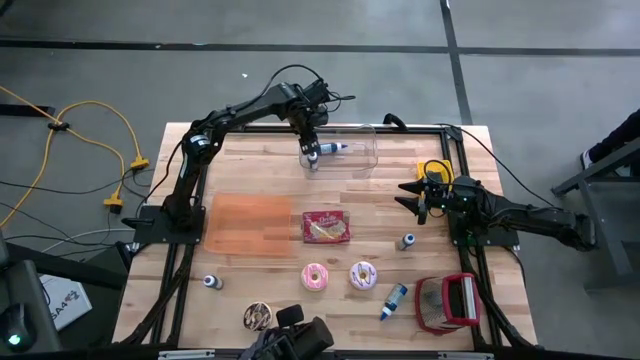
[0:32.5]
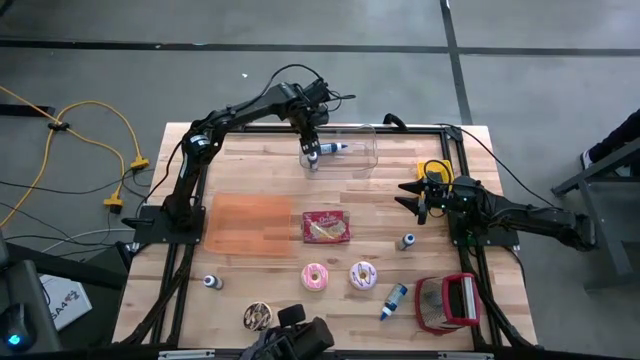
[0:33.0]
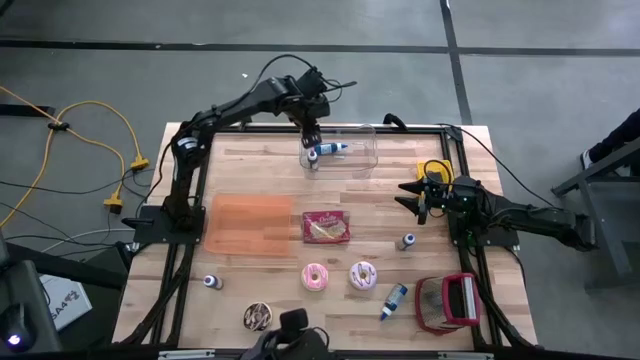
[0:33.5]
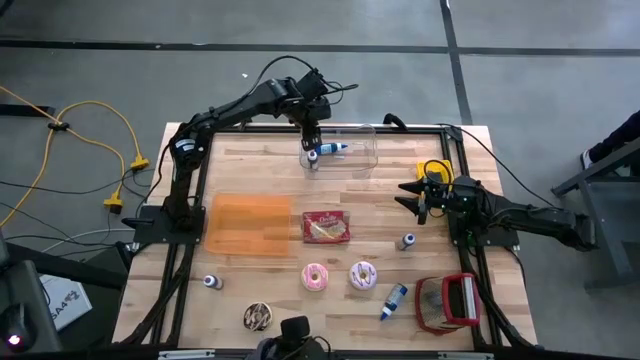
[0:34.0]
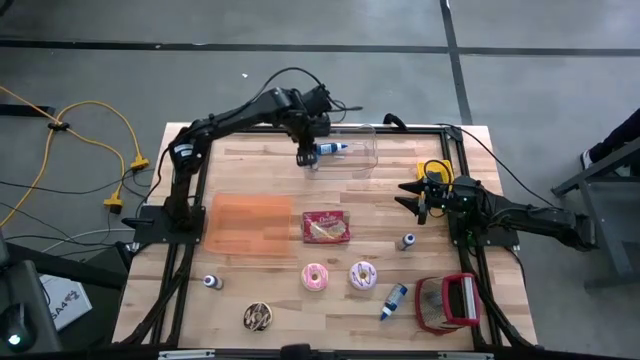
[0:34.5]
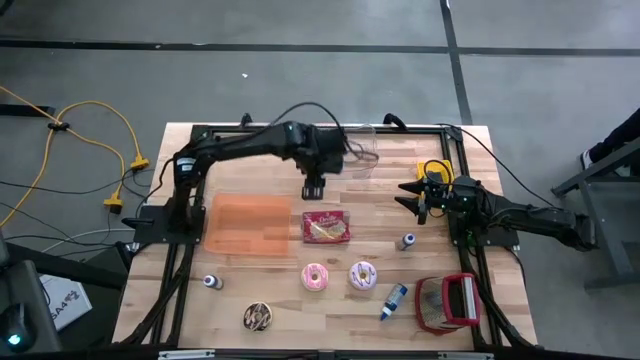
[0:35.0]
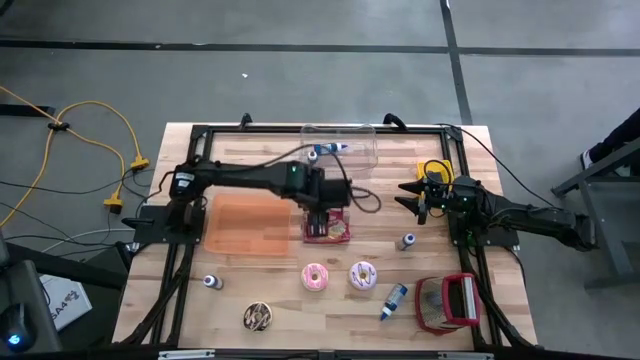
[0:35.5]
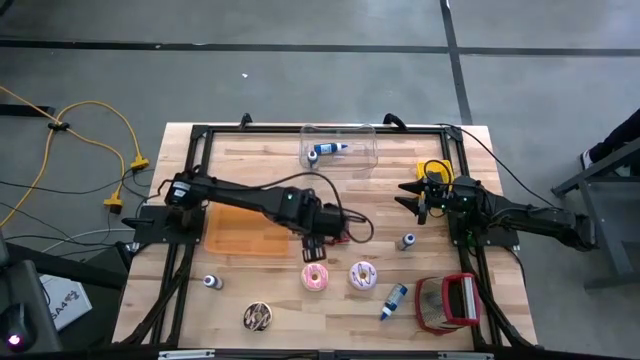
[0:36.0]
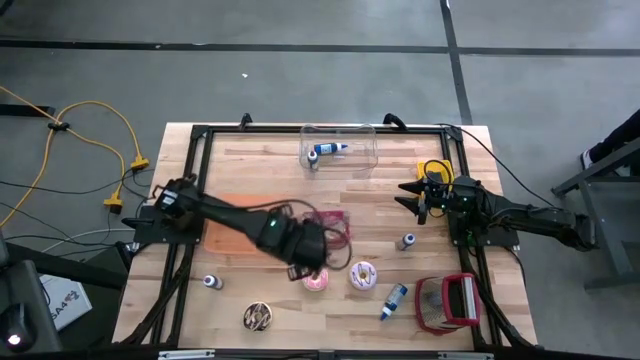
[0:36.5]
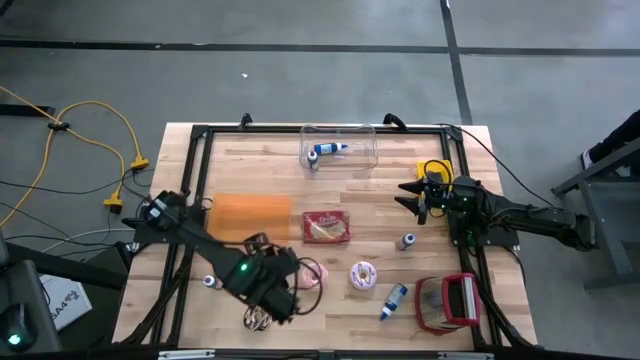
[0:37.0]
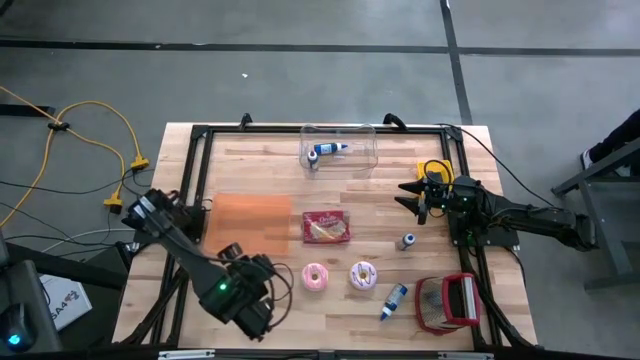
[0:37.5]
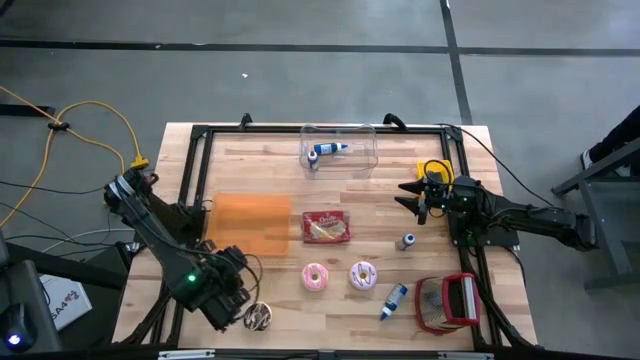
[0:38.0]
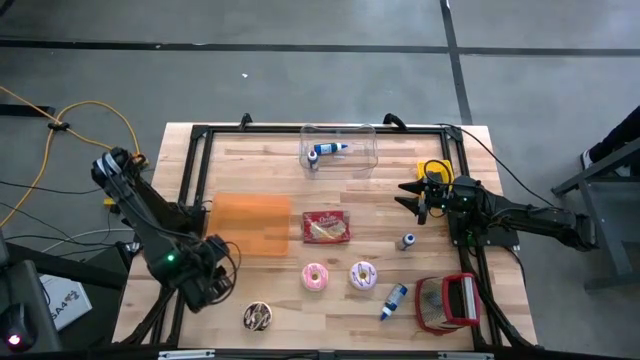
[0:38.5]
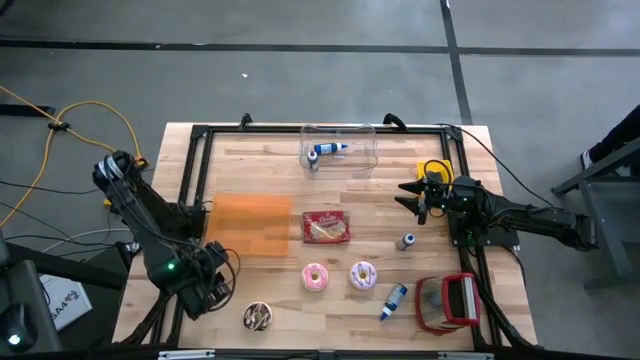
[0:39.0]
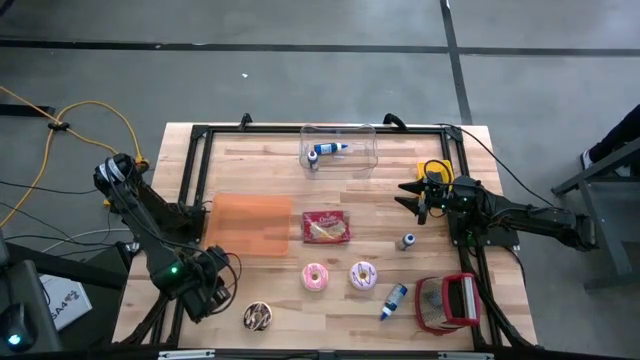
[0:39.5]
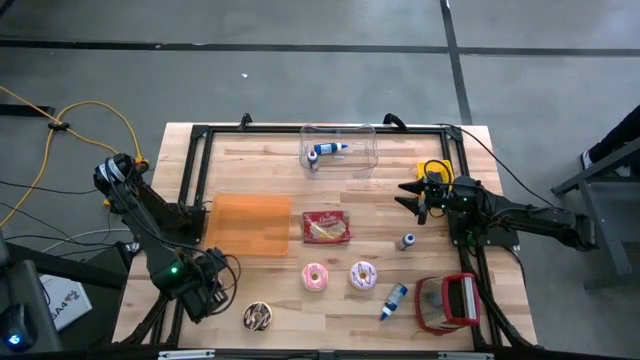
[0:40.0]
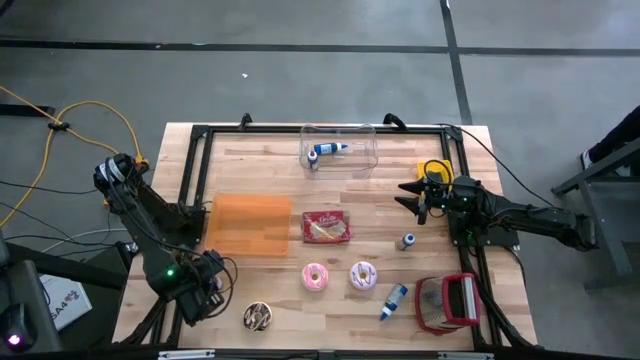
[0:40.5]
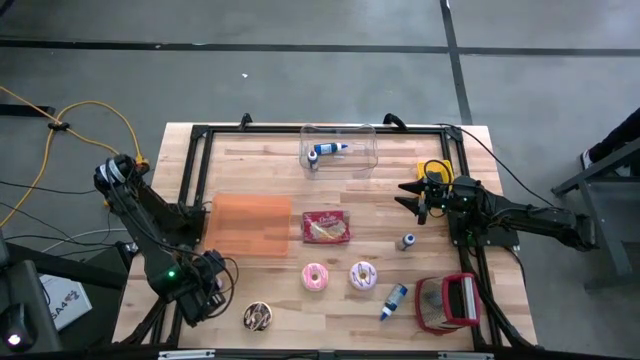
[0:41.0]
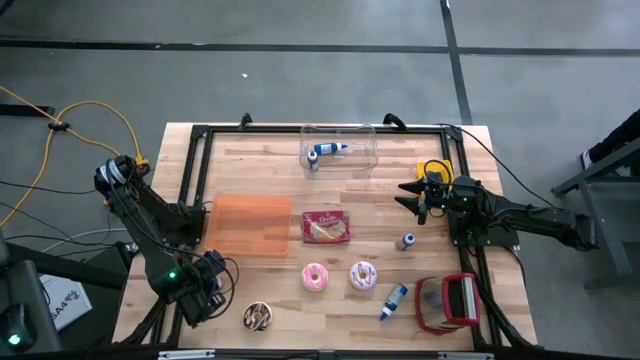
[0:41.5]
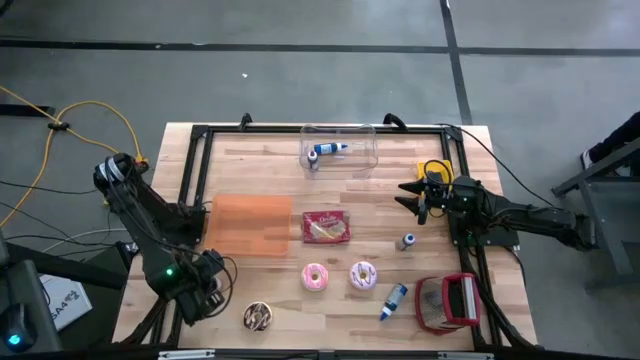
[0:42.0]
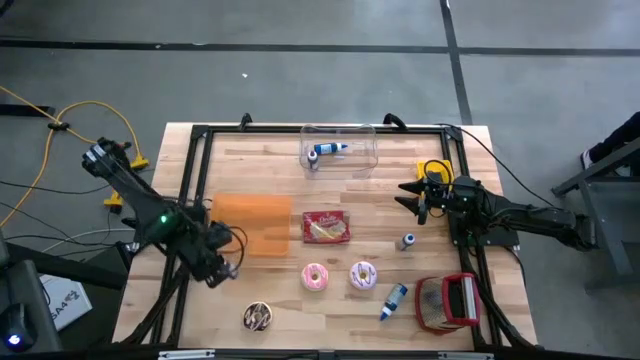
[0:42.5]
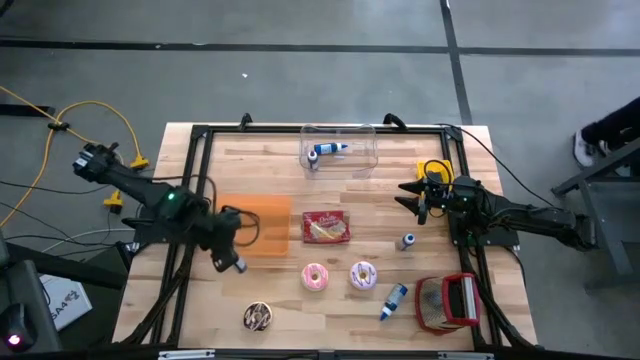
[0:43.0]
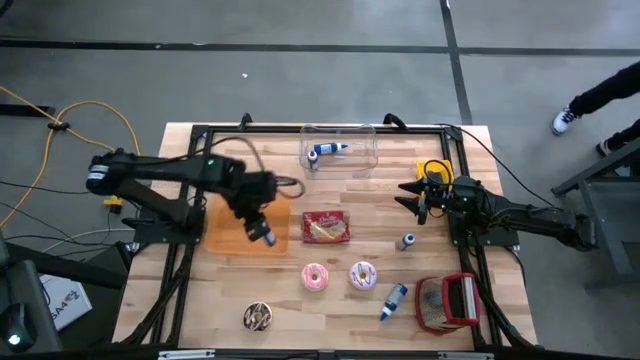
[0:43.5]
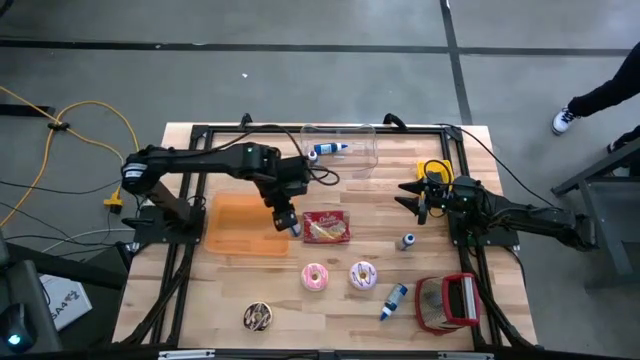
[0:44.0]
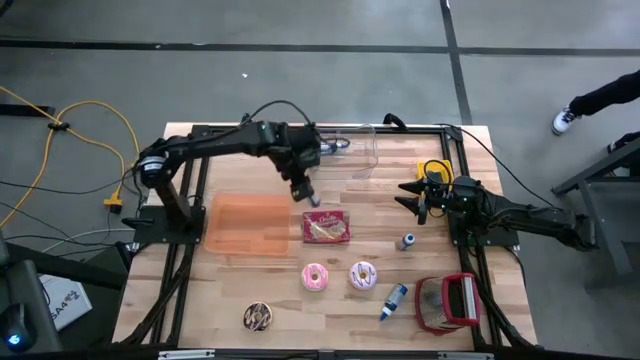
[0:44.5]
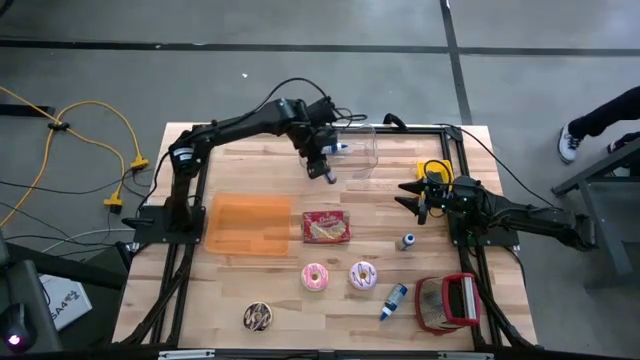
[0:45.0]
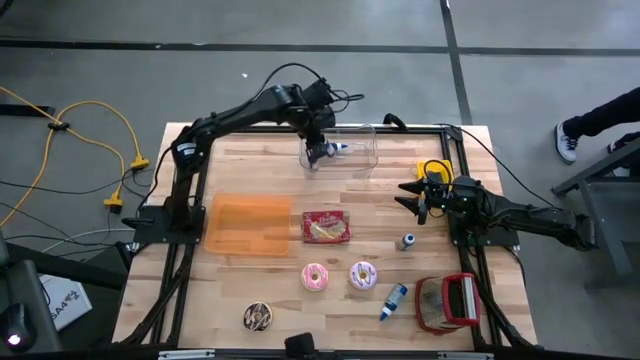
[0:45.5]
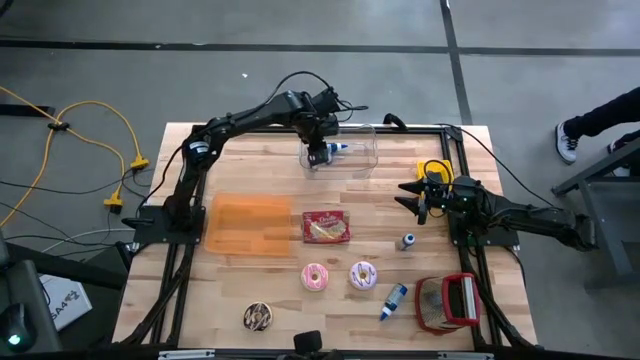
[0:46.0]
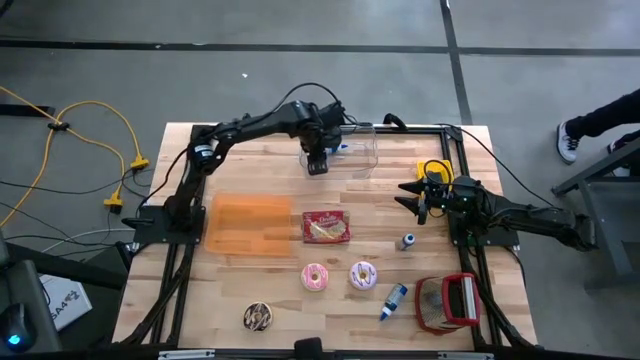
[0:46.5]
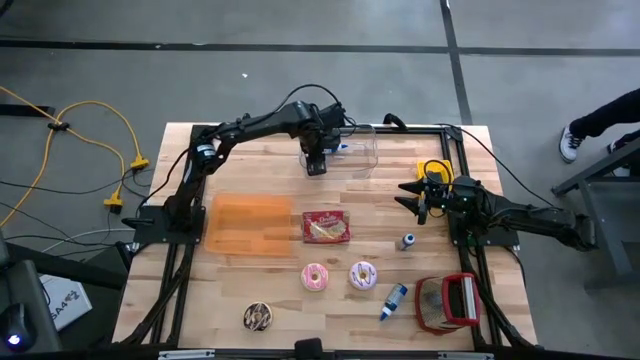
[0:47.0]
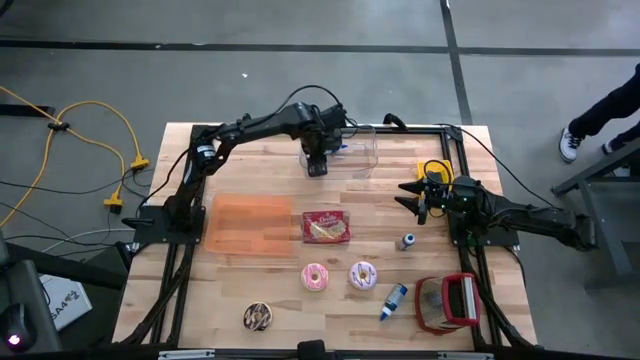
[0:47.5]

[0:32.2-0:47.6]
Put the violet food coloring bottle into the transparent bin

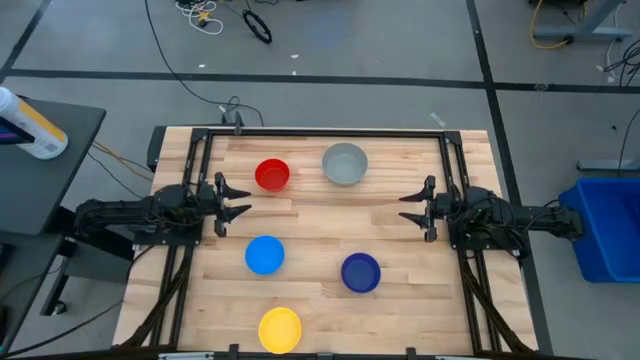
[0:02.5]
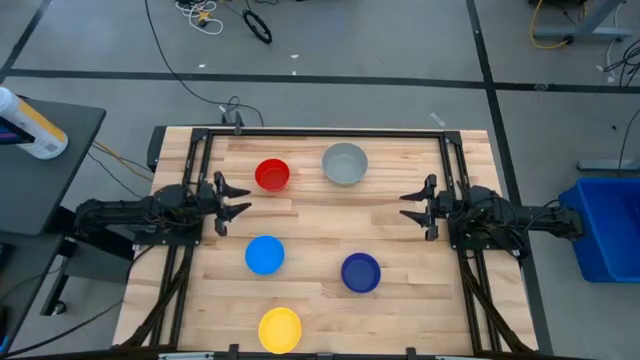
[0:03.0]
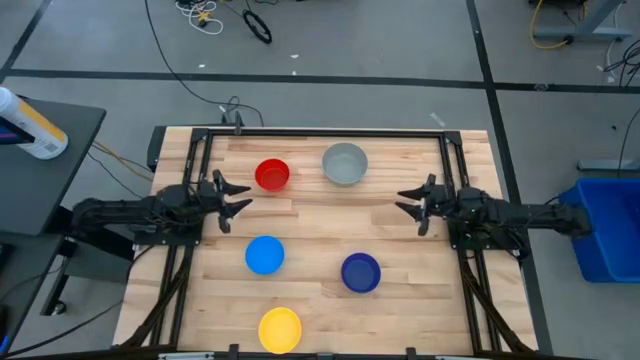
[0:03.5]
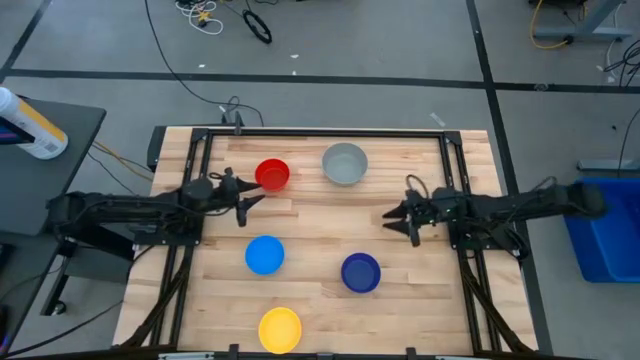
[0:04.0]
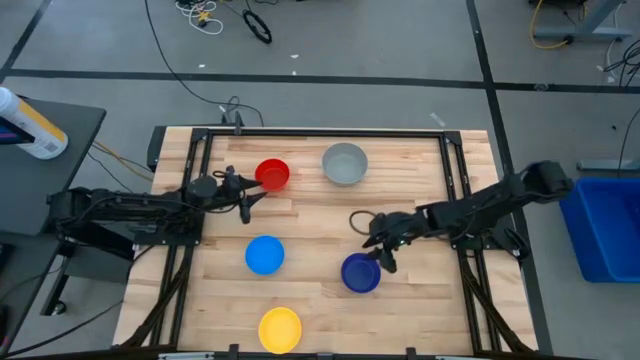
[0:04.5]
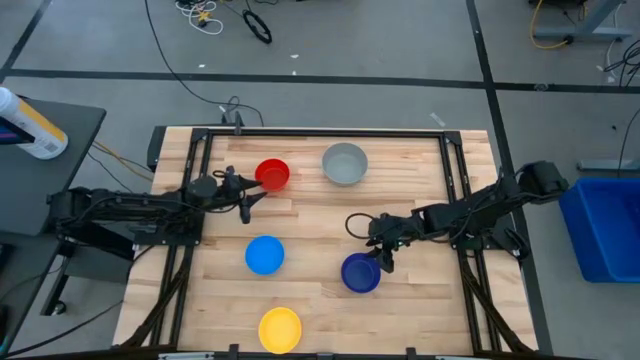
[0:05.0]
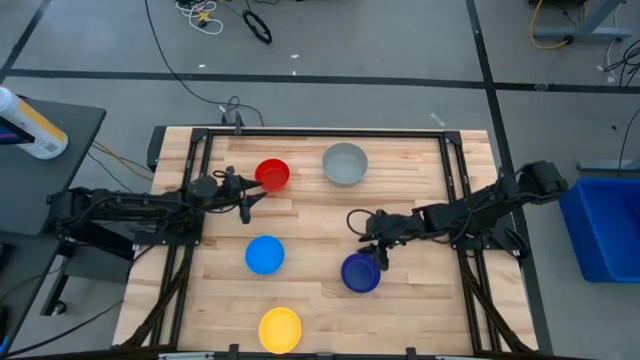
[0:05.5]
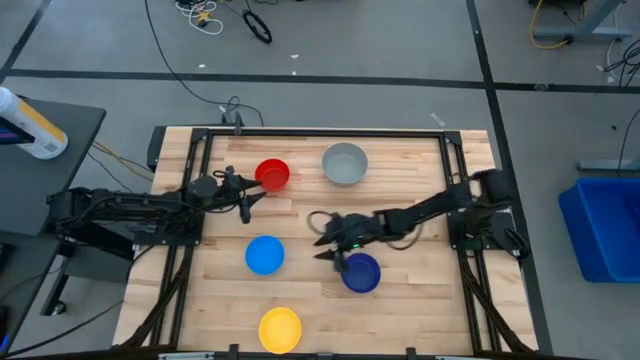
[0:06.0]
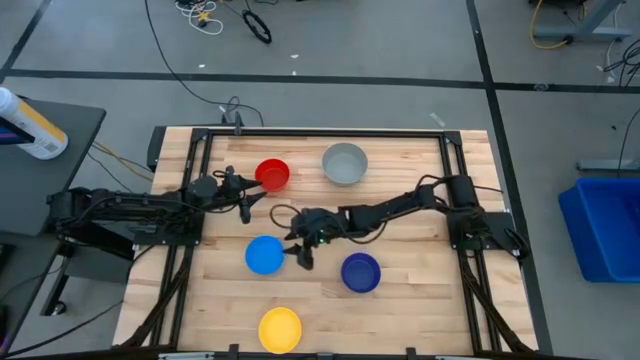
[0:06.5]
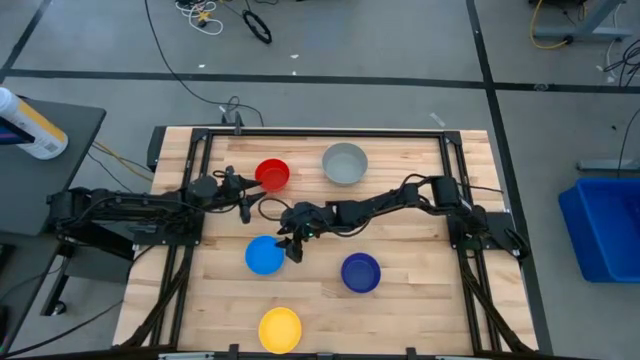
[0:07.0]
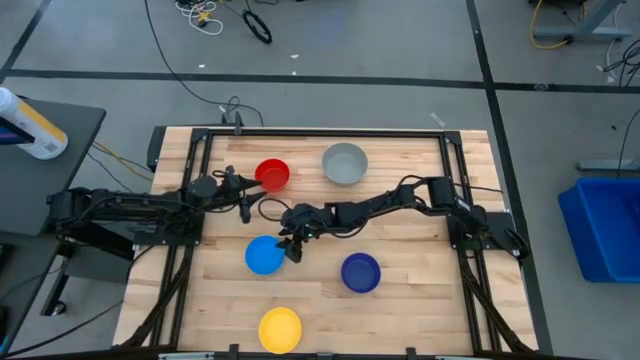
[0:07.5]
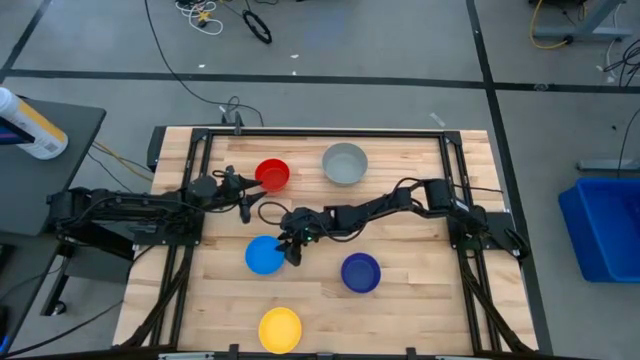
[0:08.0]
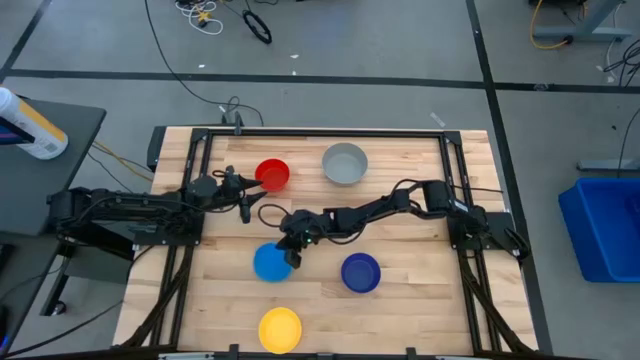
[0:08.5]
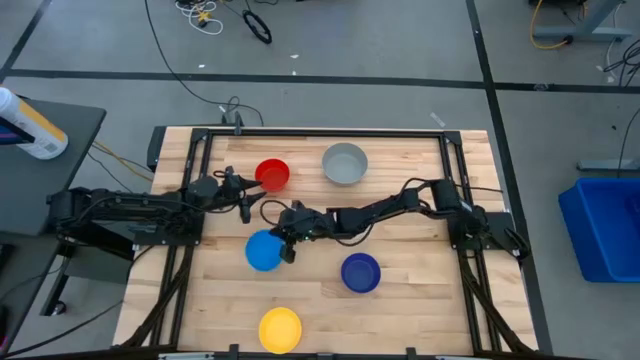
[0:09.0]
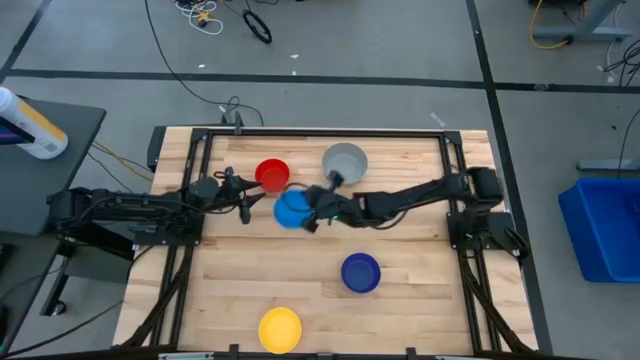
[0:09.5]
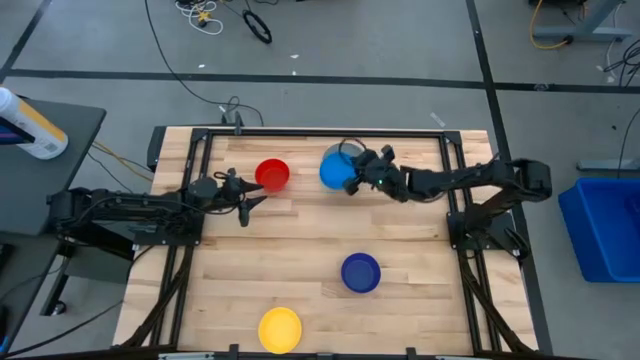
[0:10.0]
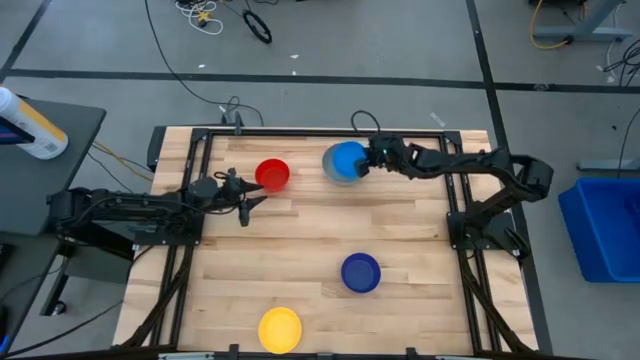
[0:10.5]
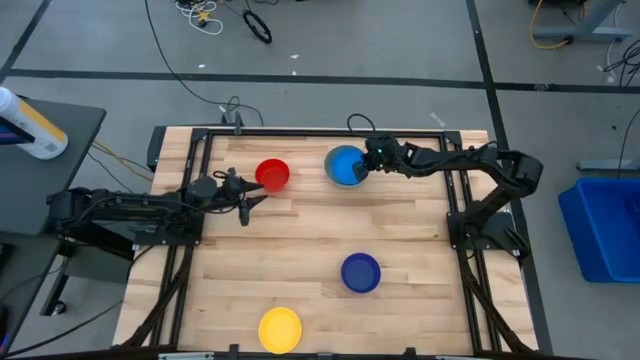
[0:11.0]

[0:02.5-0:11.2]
Stack the light blue bowl in the gray bowl
